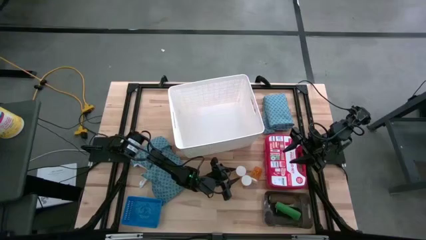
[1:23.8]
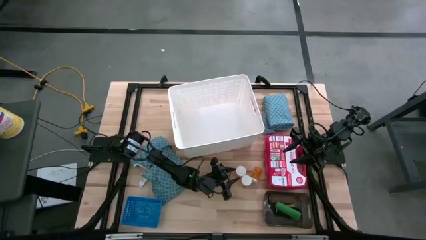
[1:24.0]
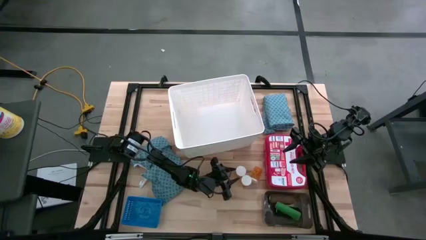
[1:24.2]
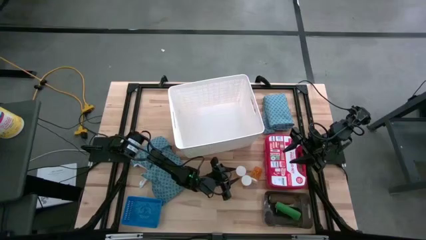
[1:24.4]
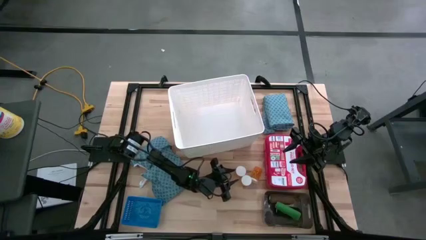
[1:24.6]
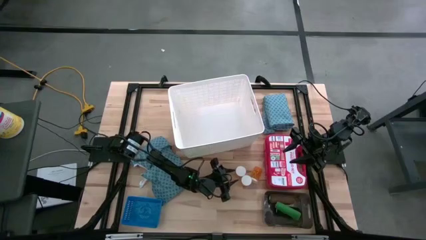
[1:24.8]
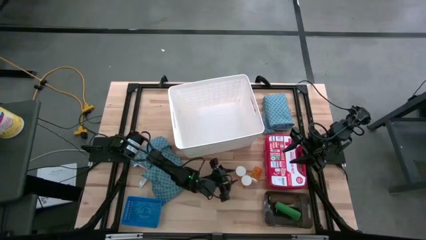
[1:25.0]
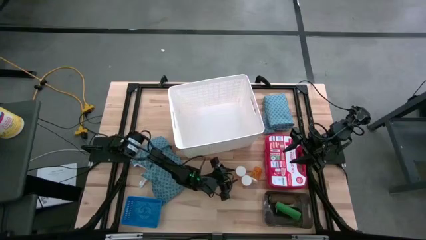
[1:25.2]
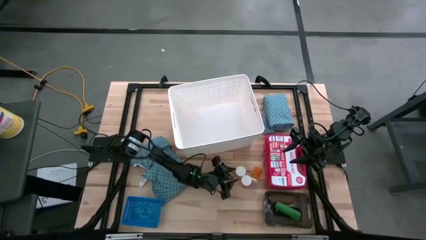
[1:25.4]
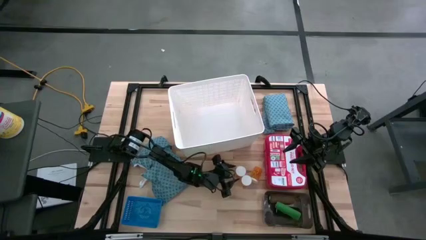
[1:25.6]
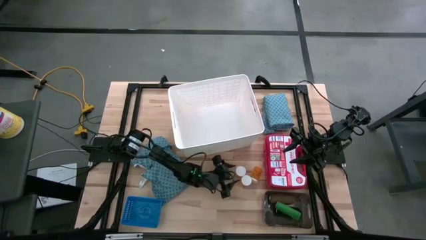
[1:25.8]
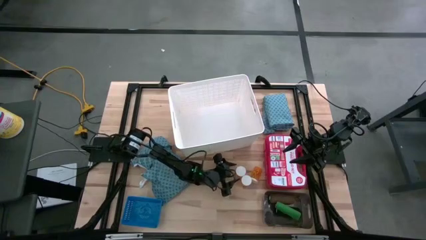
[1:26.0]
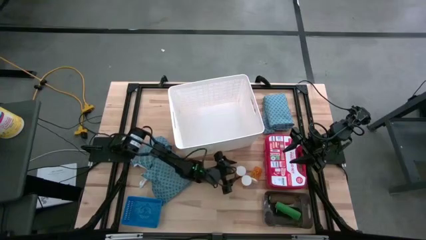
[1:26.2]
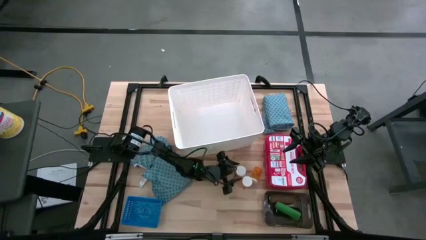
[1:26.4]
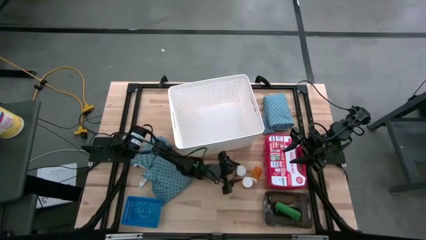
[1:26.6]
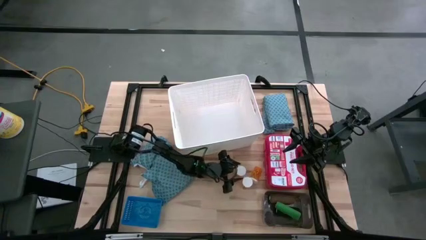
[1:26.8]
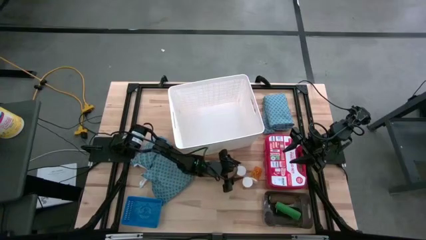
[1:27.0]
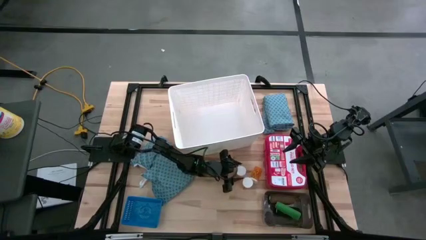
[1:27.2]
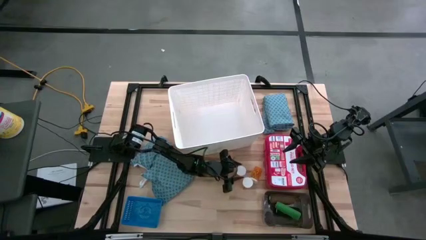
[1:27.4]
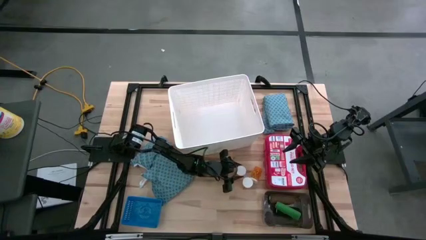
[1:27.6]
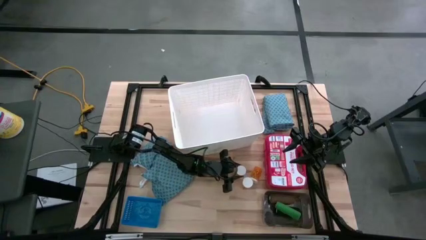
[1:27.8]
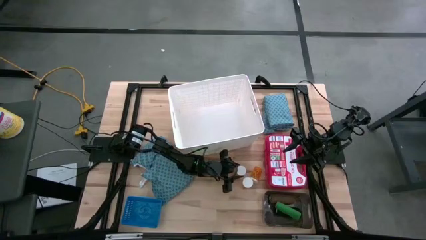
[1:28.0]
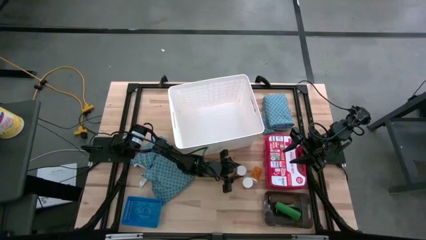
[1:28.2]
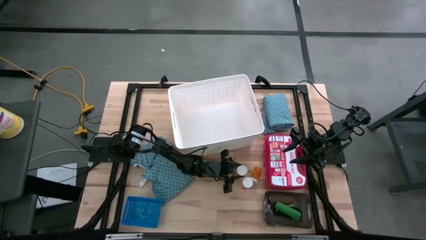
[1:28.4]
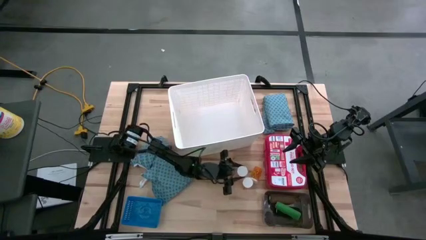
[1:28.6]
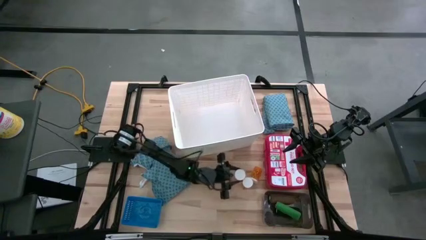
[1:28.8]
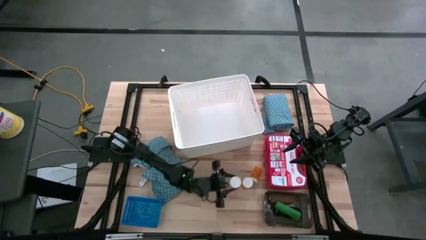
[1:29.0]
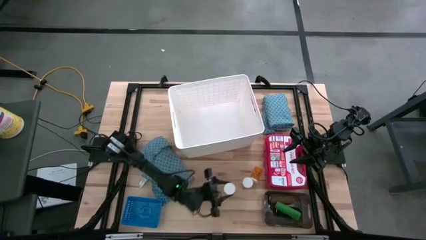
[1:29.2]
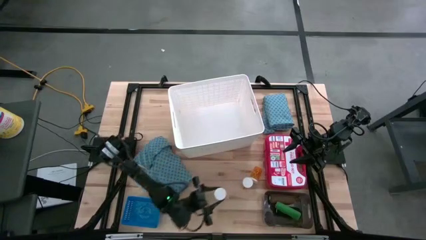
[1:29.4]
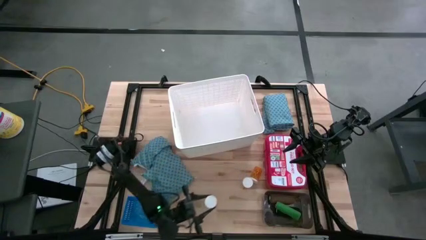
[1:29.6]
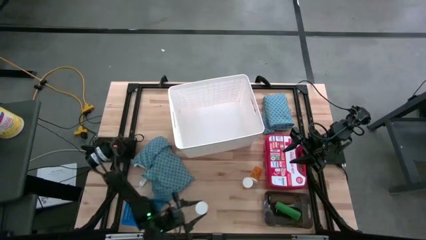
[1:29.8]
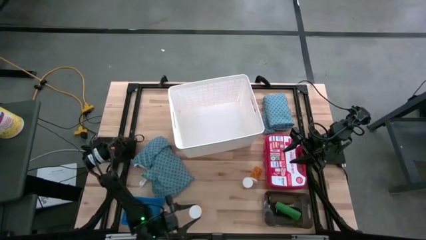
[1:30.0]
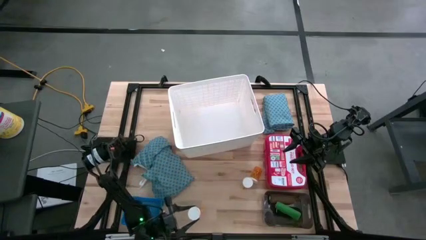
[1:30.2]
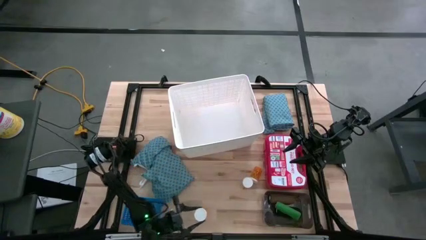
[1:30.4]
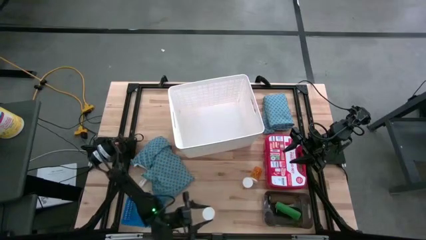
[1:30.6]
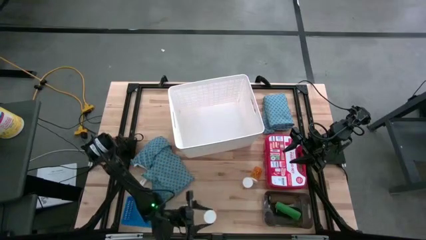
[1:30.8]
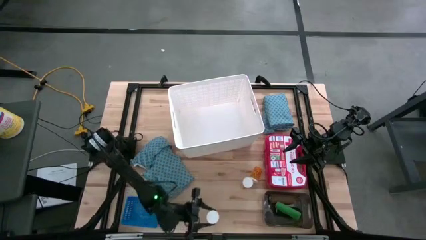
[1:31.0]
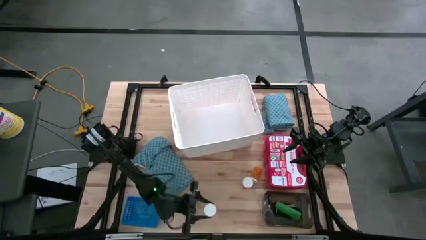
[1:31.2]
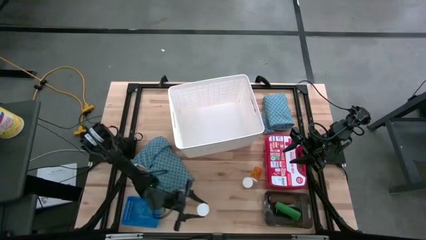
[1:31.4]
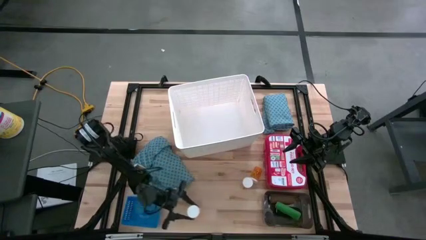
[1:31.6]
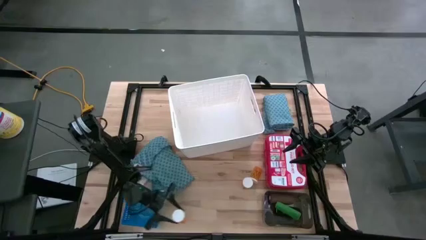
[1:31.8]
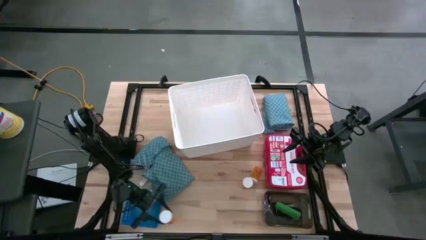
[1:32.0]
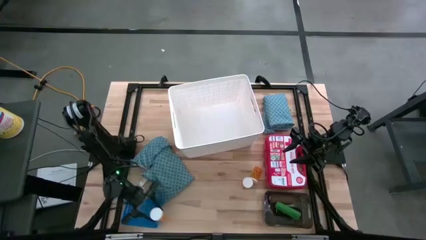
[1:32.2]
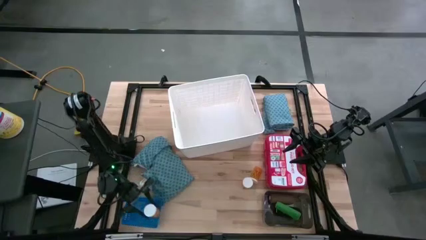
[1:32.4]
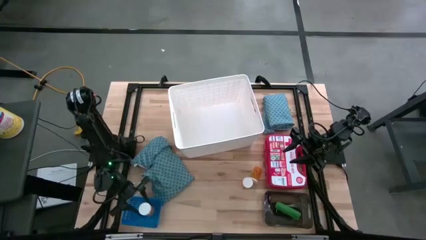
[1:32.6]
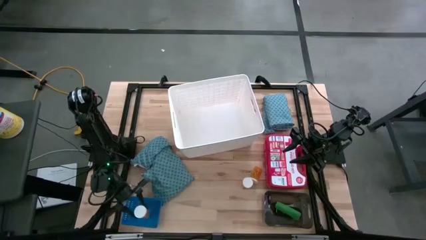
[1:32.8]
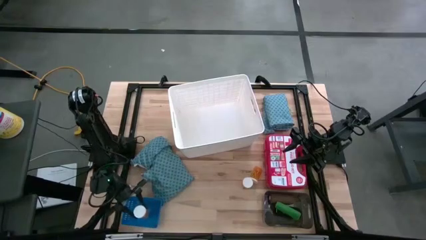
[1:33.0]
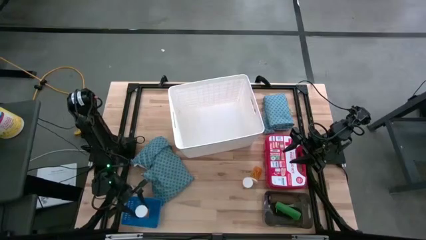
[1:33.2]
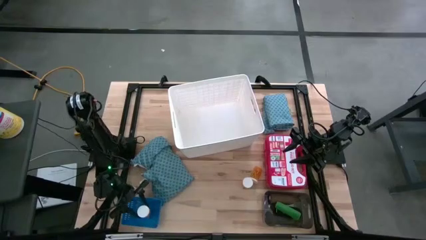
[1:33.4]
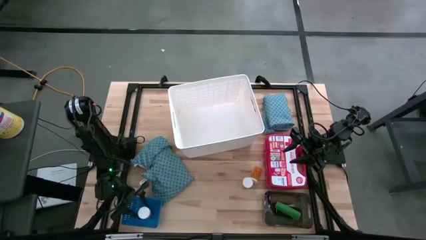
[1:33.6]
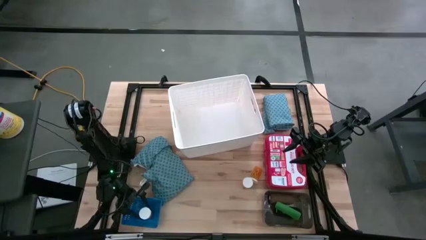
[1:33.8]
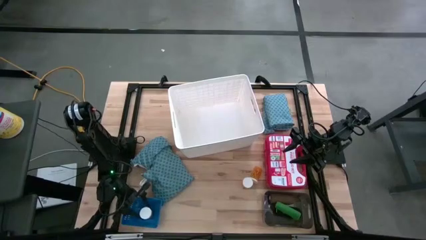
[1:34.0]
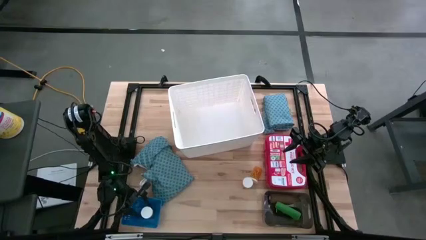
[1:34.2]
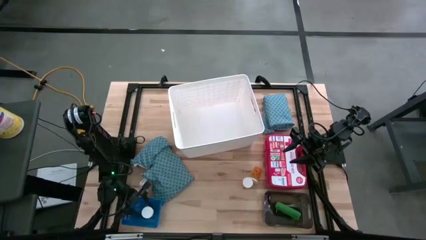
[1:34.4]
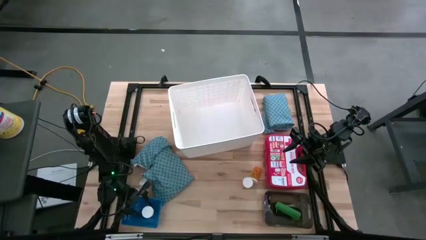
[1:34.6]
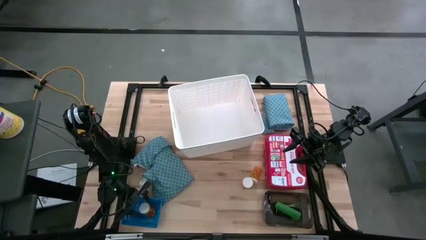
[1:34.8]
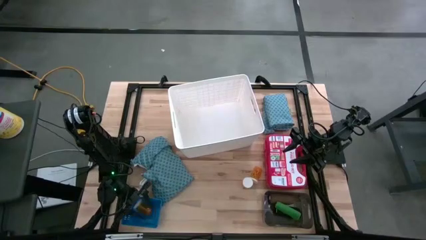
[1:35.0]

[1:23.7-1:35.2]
Task: Pick & place medical supplies in basket/bin
Put the left orange pill bottle into the blue bin

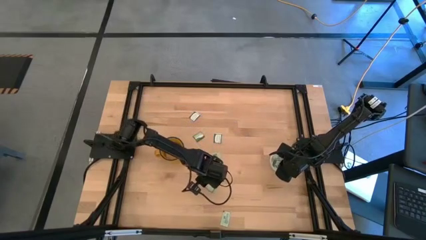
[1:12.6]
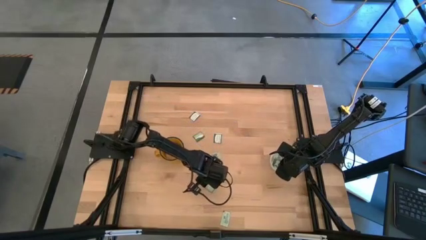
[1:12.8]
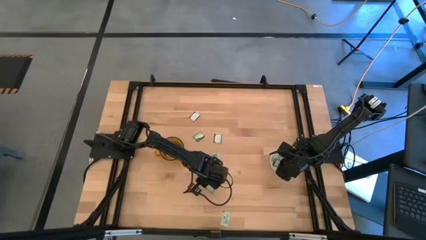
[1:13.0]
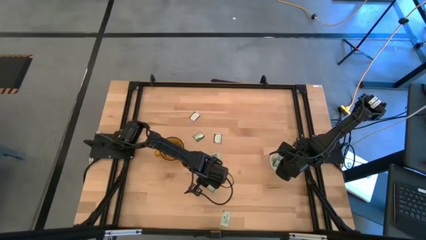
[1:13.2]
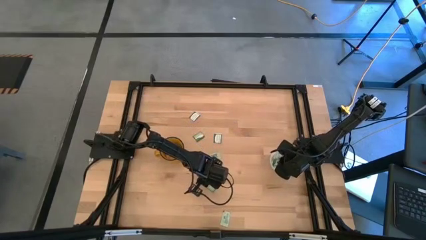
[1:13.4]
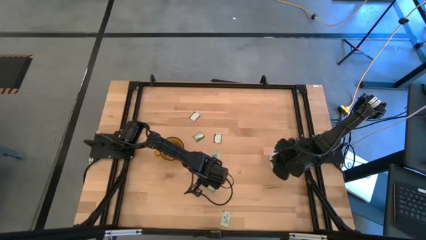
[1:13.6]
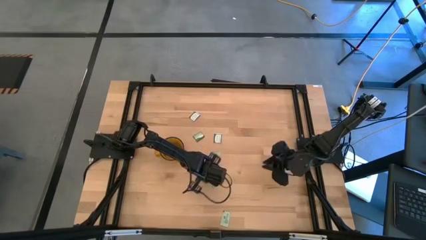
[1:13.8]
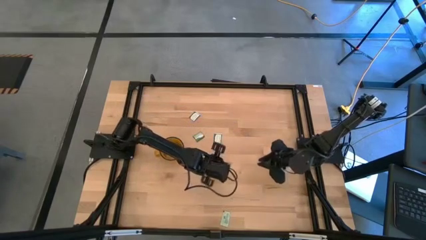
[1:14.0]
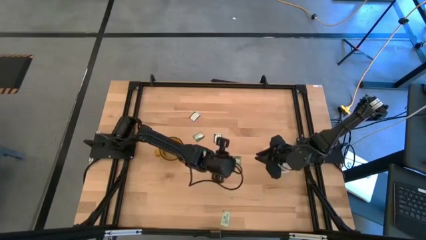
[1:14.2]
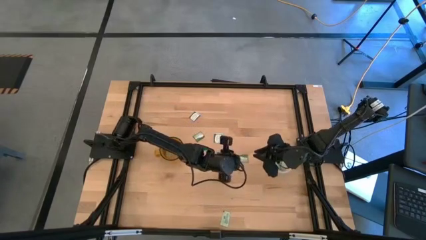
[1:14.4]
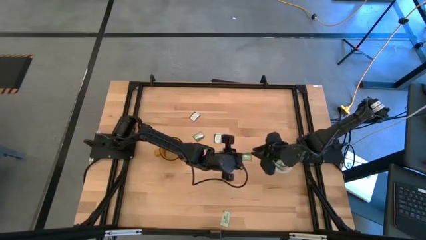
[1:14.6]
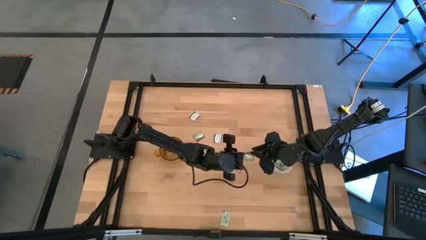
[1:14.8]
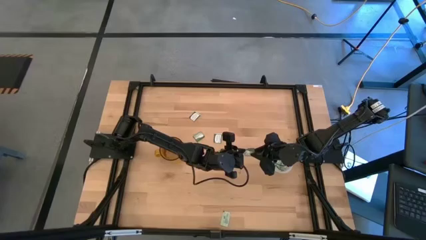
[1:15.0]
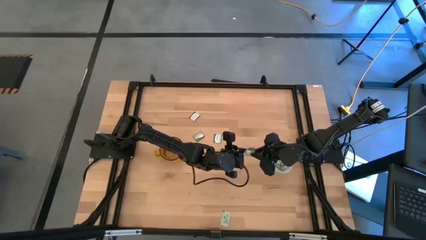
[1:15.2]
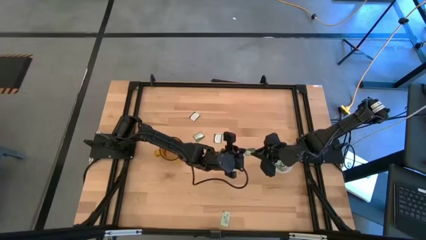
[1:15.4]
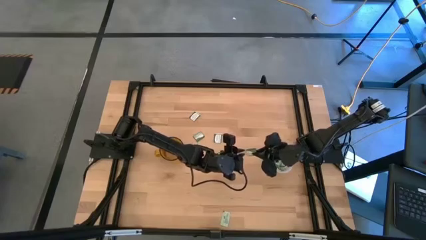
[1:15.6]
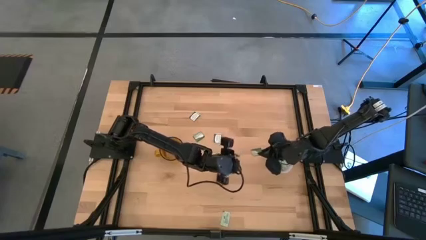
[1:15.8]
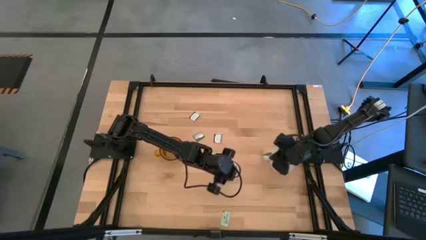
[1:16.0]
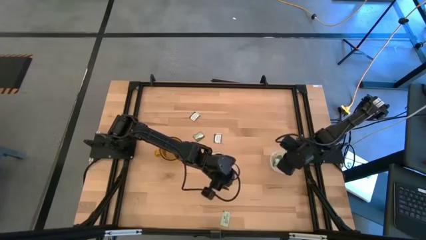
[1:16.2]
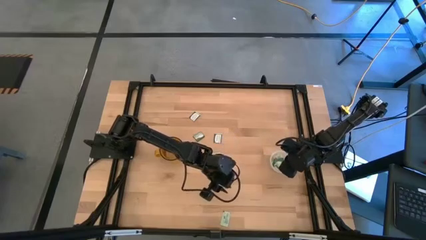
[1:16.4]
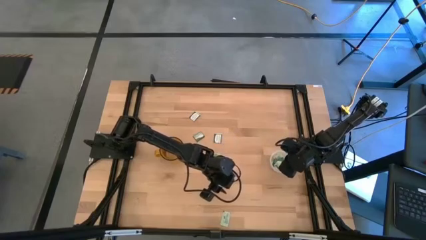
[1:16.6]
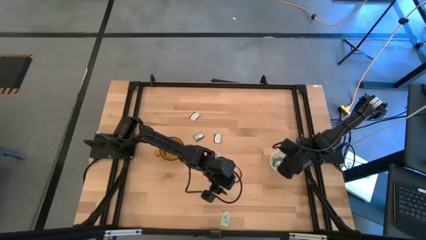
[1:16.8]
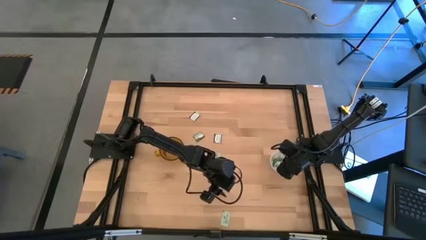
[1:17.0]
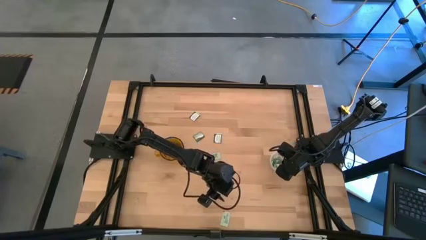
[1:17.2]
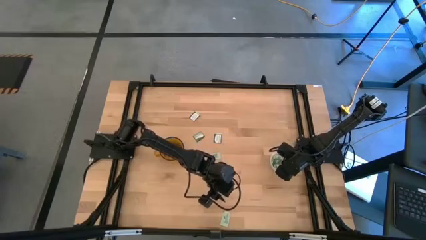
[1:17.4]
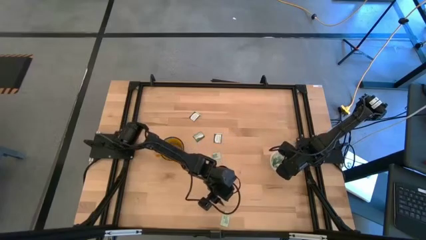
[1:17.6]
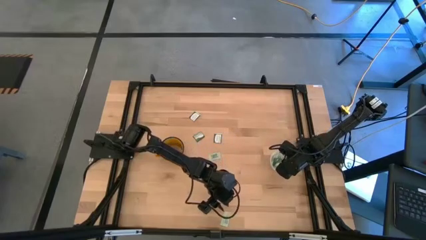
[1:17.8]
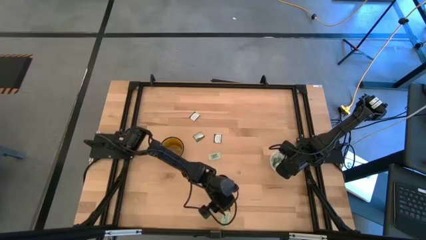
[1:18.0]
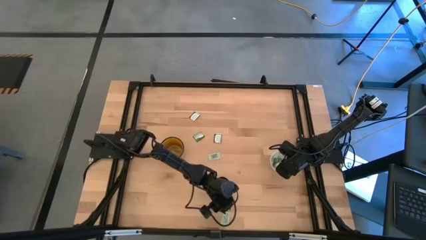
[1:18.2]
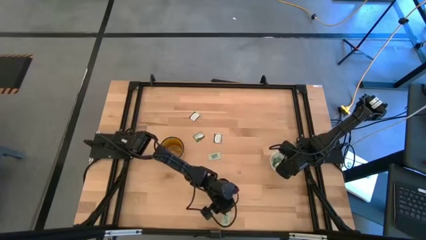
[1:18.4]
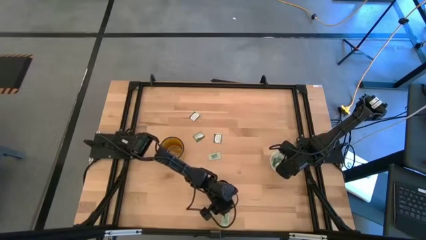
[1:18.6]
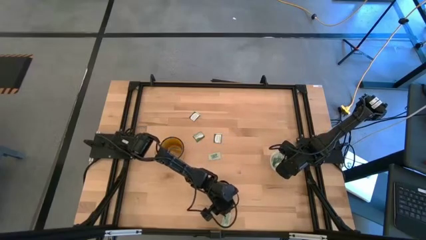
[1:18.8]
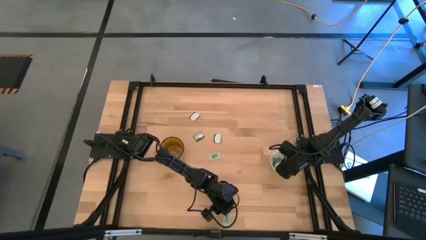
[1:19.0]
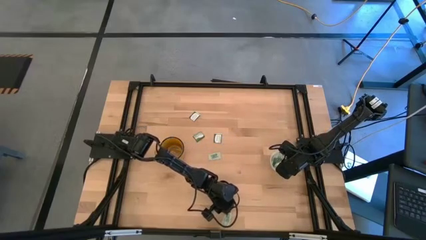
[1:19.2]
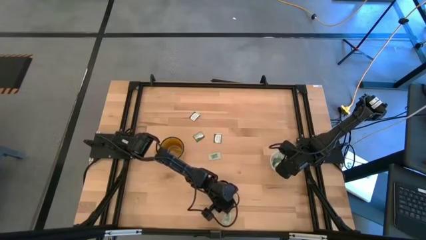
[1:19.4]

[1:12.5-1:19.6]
Task: Pick and place Stevia / Truvia into bins
Put the green stevia packet into the transparent container
